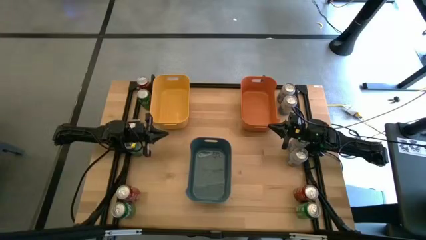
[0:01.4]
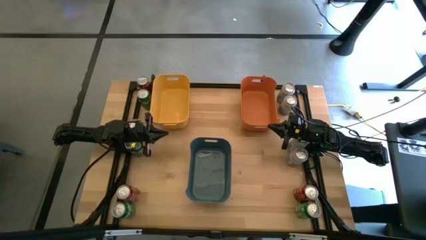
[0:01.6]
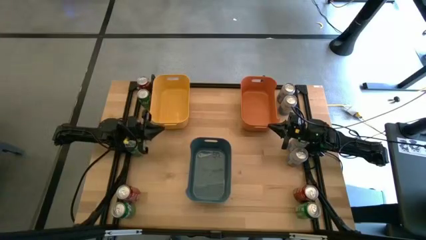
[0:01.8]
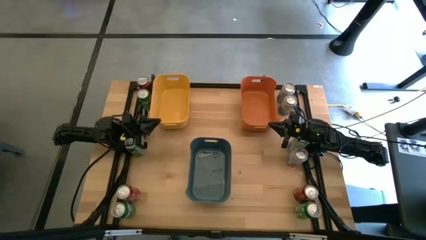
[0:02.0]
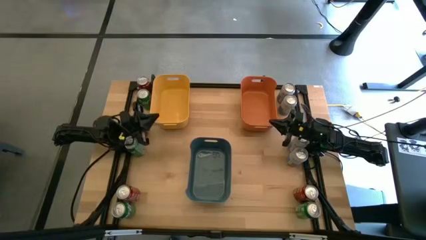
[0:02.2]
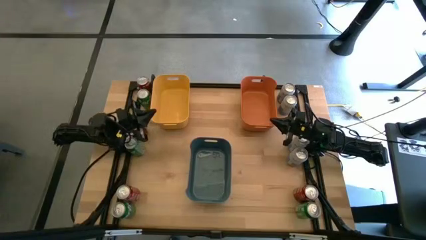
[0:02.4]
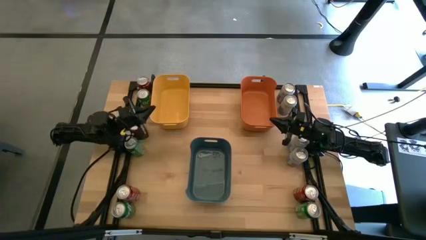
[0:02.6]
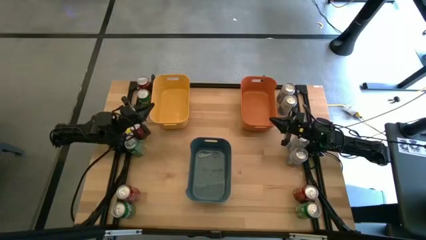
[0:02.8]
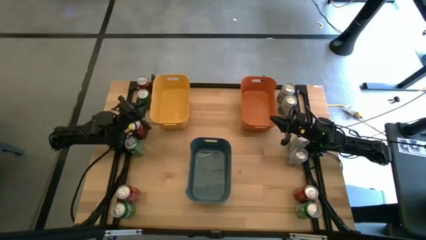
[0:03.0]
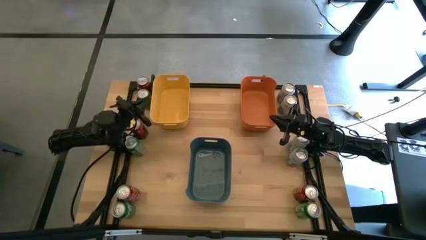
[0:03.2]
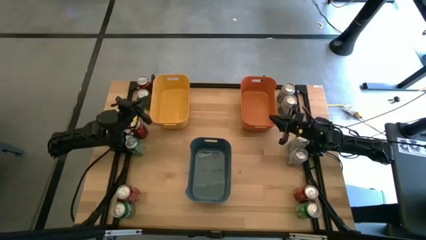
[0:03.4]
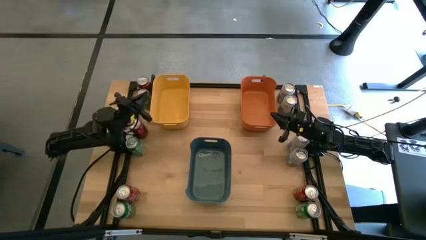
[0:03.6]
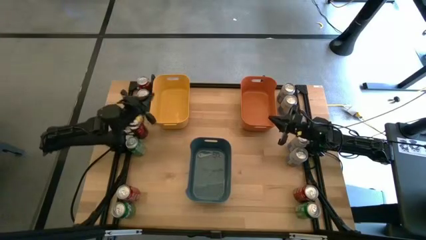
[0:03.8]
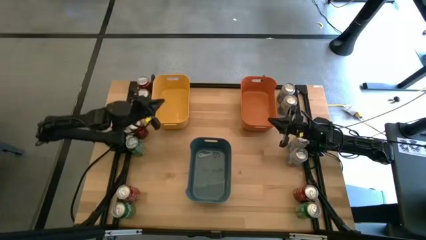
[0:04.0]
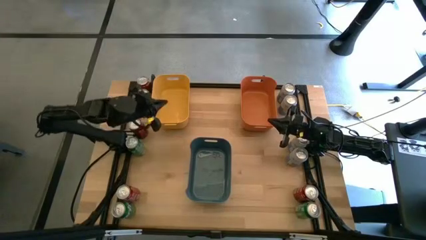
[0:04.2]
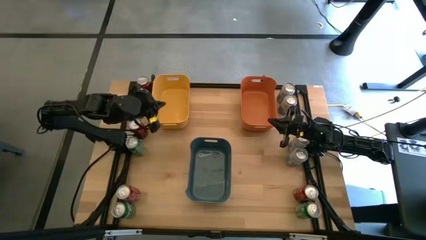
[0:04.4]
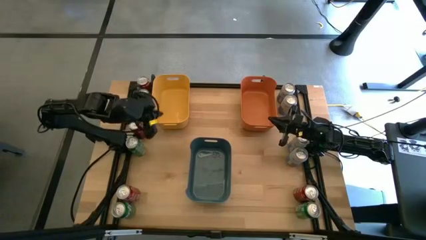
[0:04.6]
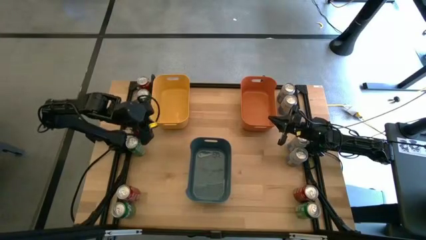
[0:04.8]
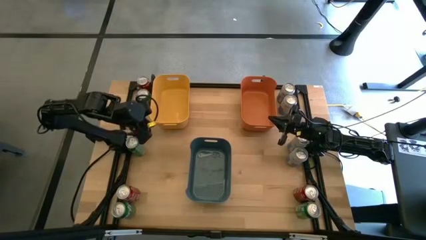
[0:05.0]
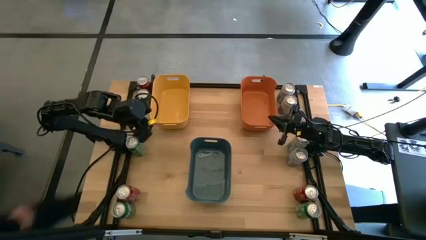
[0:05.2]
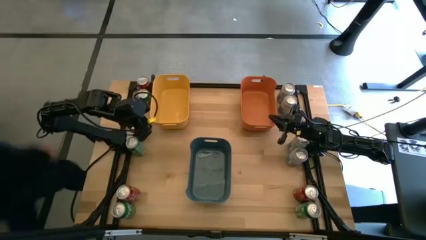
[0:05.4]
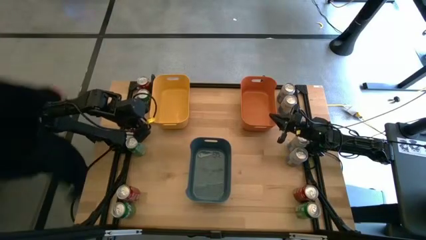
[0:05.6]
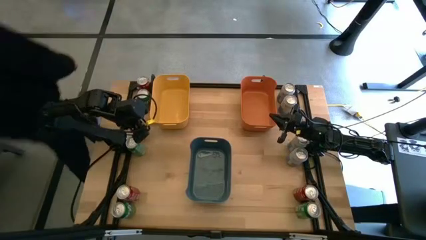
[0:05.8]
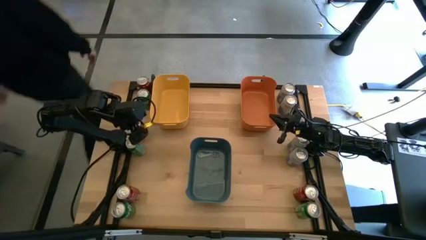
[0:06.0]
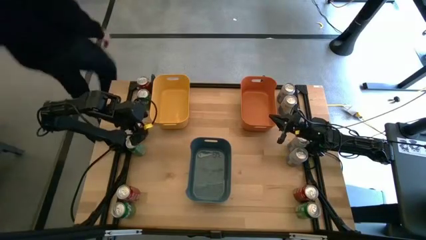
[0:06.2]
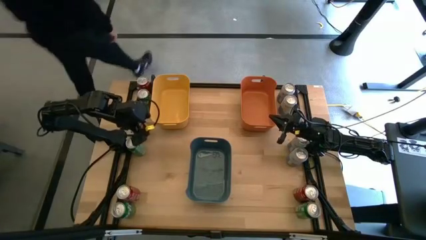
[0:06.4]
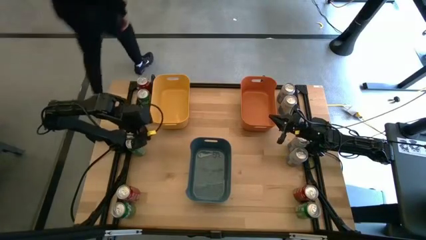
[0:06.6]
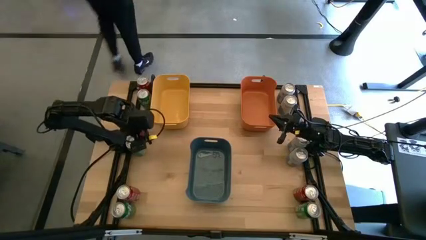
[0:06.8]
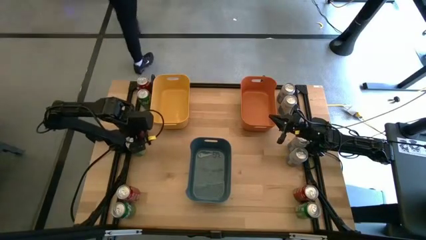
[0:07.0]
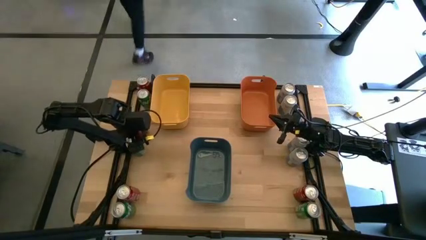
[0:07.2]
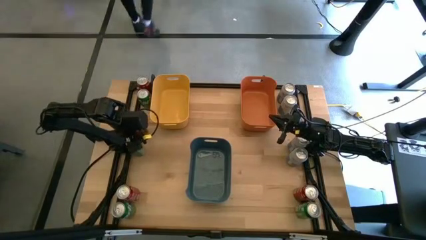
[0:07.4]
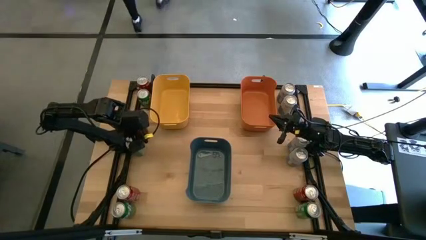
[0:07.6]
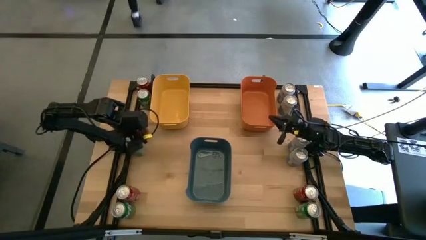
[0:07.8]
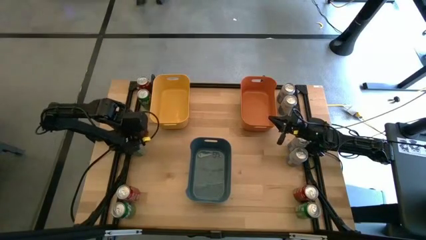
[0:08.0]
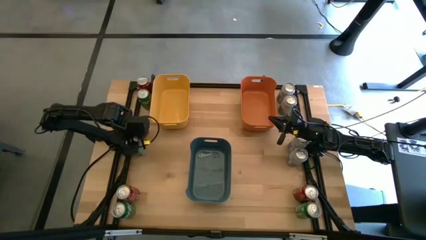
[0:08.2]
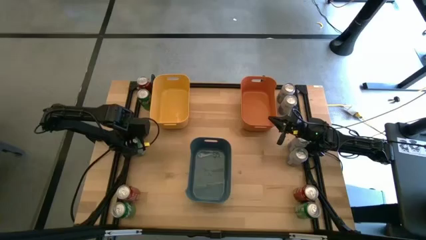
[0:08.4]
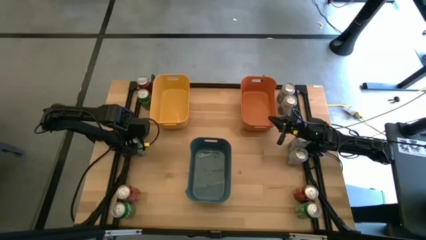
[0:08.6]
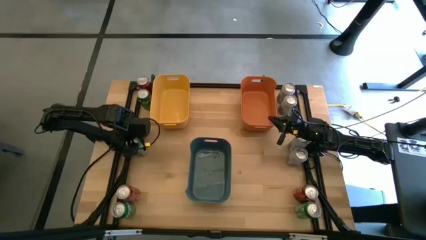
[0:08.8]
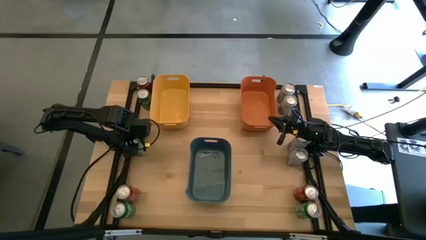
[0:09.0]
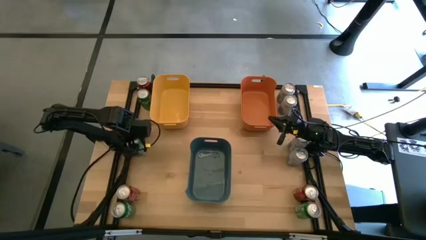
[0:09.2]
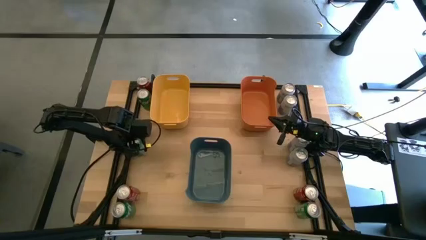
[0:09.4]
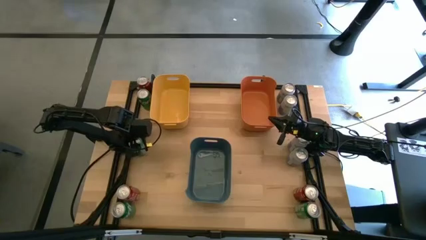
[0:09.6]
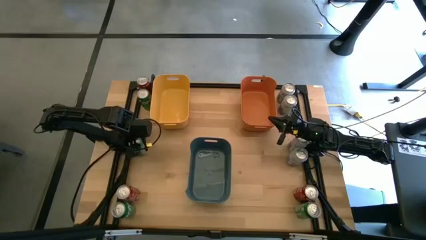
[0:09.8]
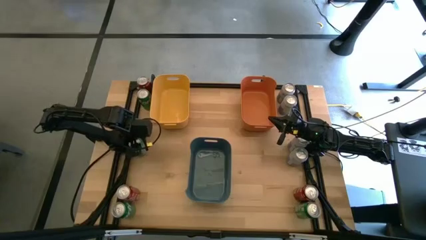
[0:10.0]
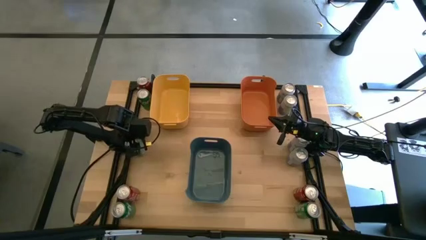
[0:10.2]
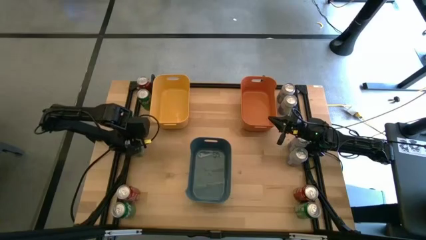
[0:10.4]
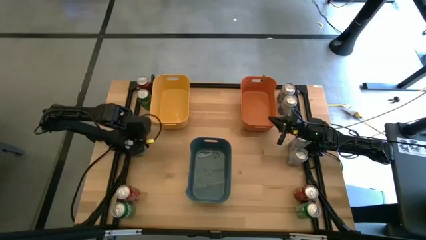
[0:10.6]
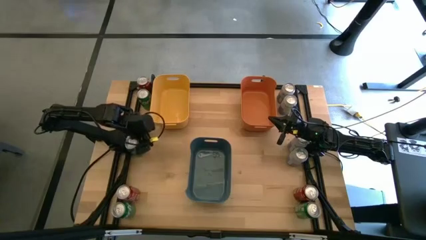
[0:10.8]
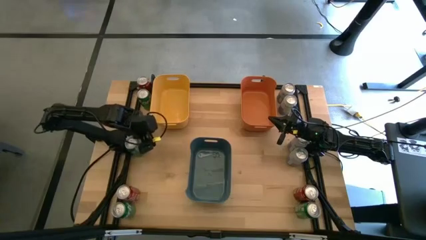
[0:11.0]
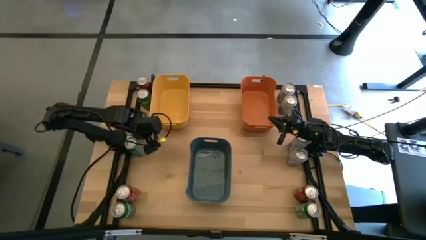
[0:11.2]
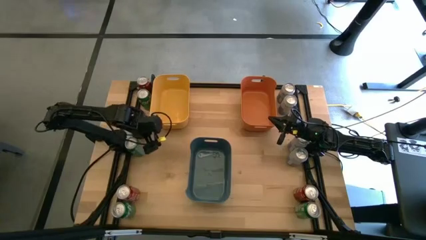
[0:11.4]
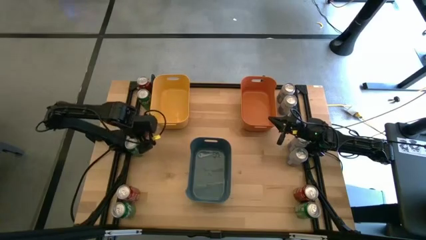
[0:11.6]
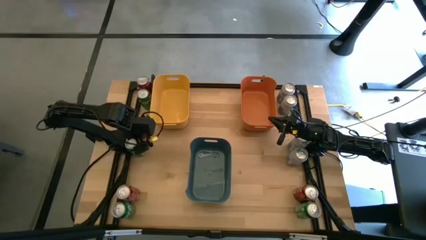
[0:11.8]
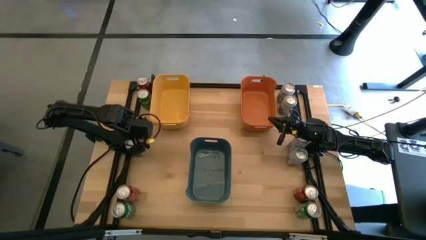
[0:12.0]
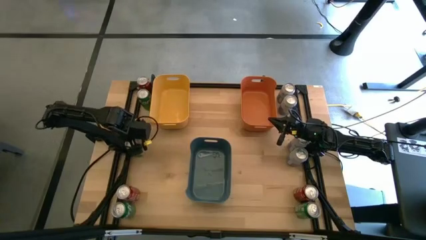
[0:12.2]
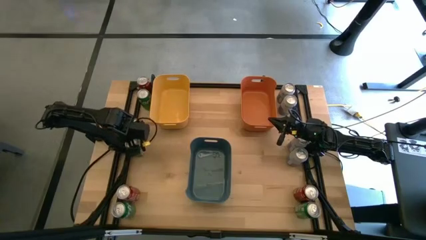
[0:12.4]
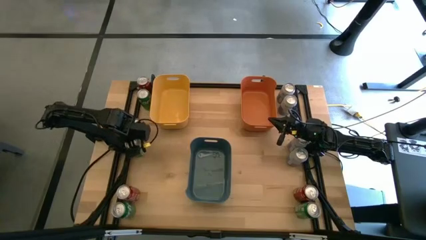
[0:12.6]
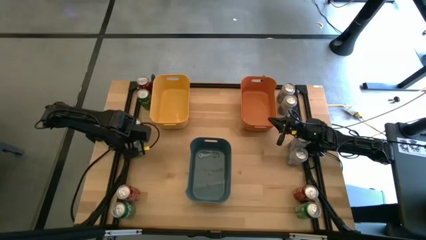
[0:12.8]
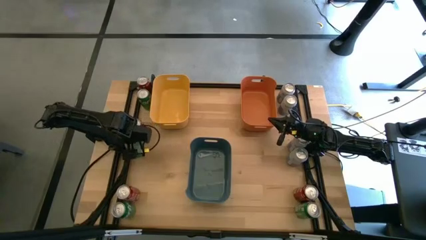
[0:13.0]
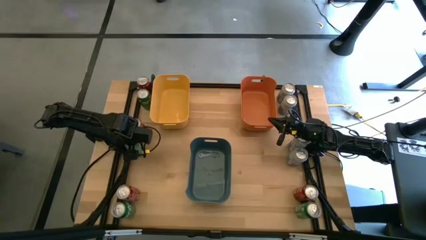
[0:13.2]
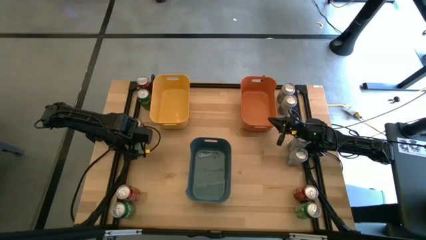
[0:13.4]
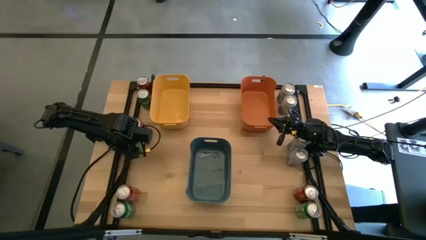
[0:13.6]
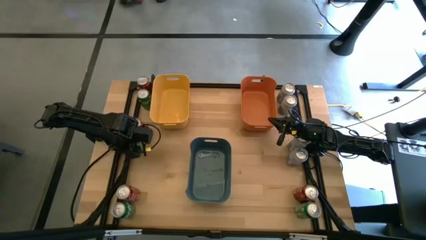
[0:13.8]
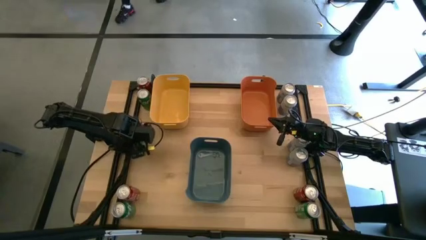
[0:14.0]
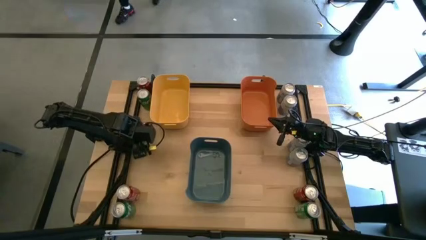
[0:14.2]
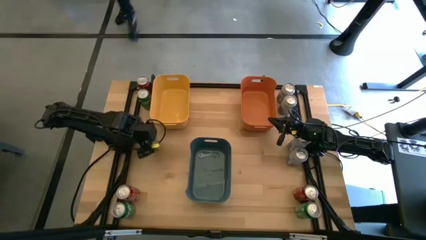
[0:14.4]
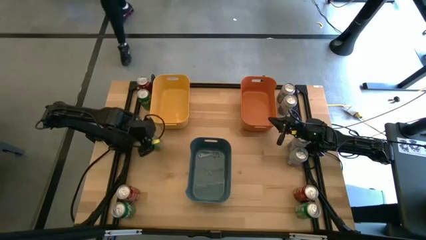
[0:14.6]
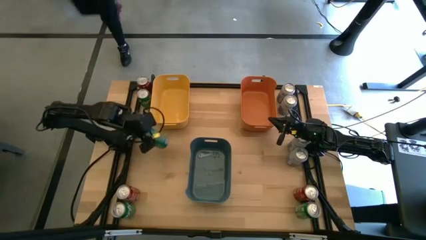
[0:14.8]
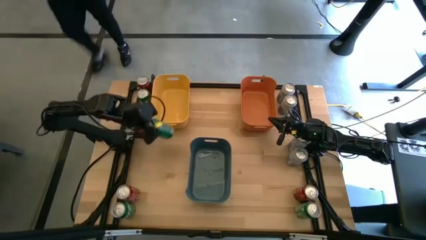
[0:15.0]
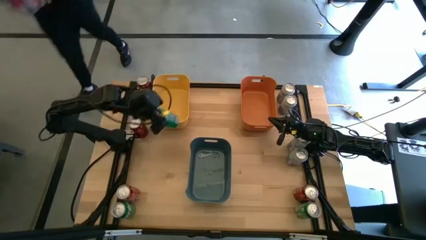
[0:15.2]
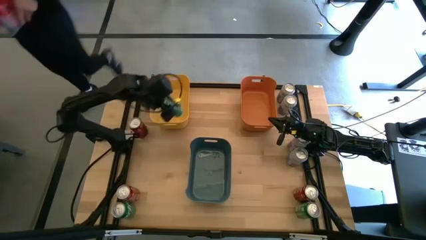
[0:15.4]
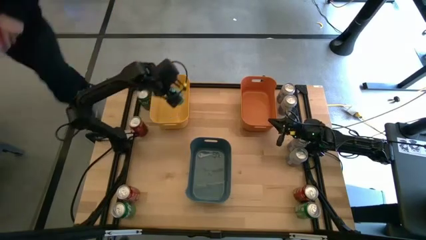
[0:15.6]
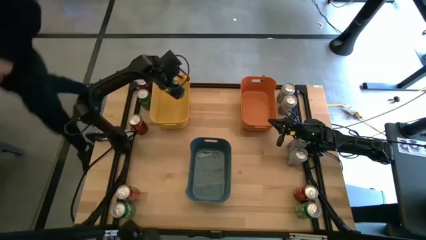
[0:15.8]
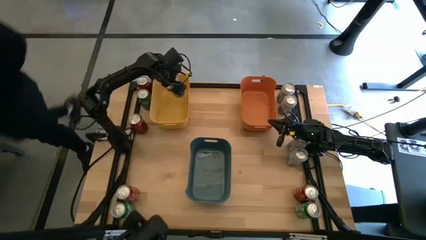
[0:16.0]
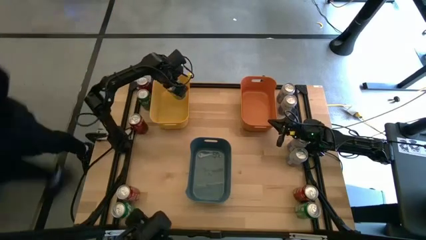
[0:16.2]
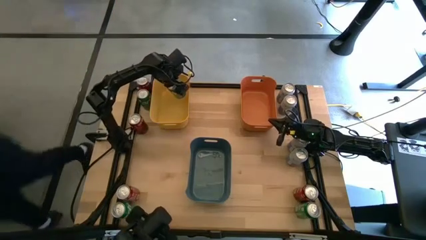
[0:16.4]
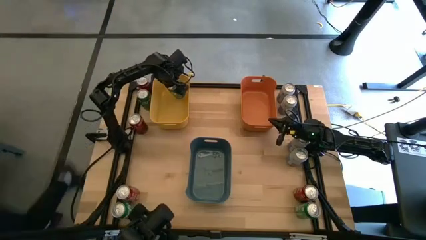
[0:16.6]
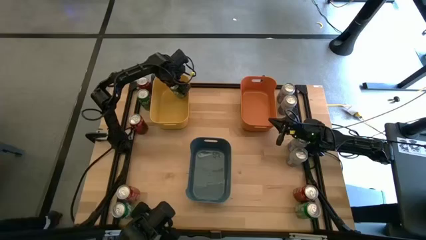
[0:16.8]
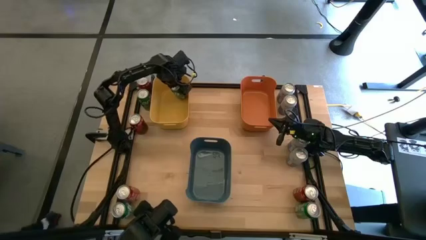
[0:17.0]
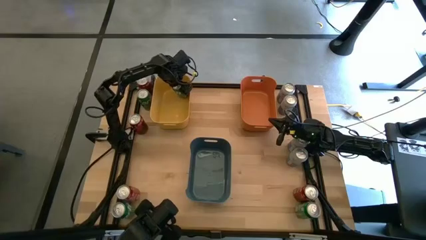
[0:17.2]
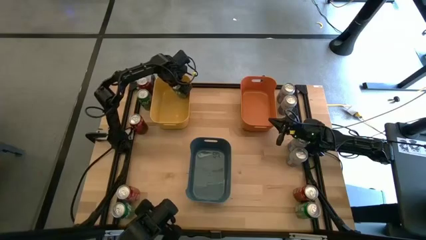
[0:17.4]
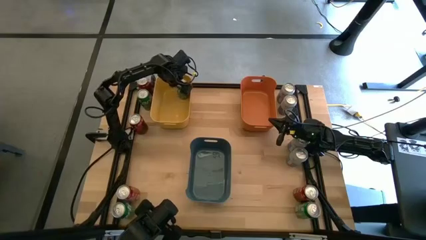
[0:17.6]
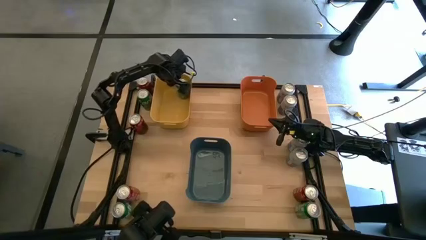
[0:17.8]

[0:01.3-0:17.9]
Task: Sort soda cans
Put the green soda can into the yellow bin
